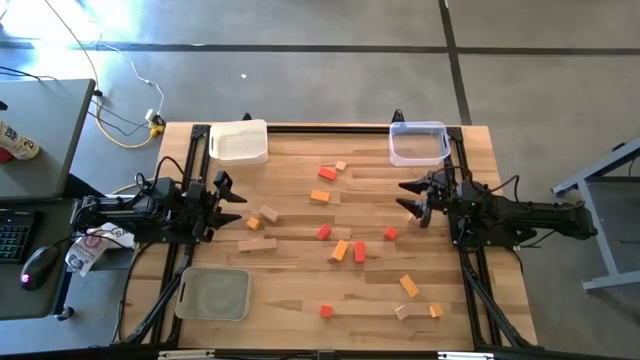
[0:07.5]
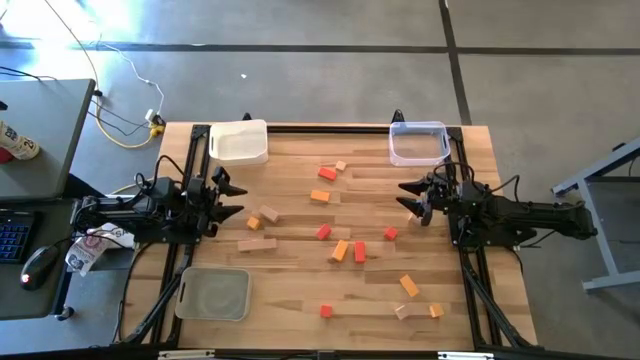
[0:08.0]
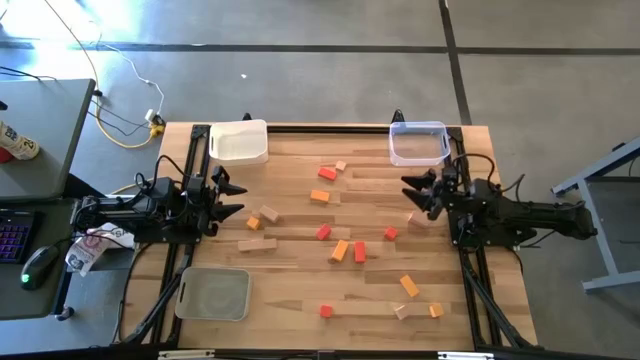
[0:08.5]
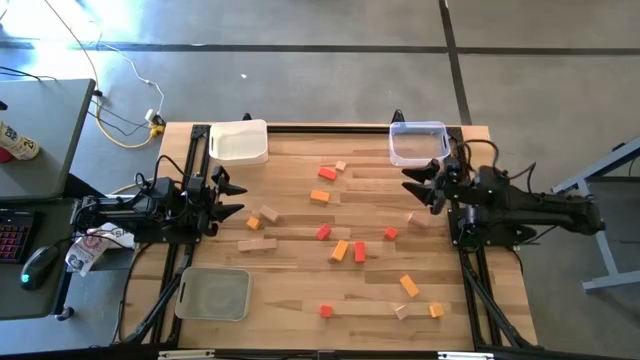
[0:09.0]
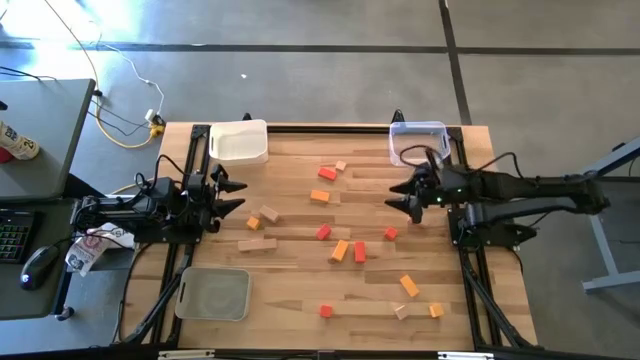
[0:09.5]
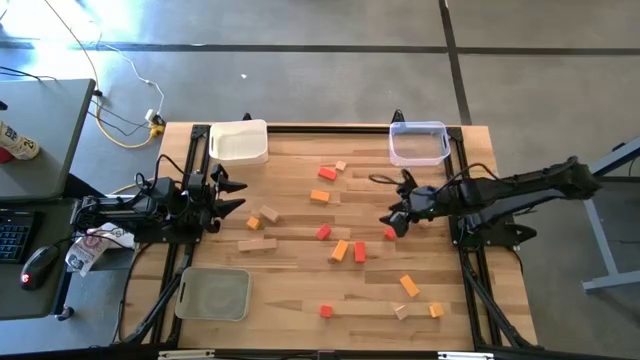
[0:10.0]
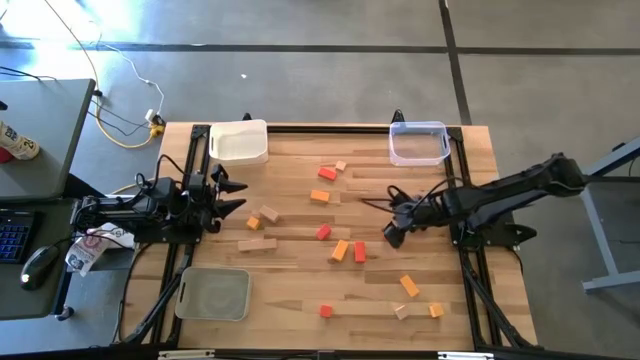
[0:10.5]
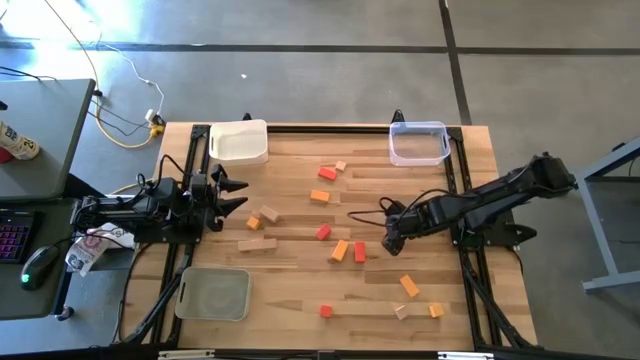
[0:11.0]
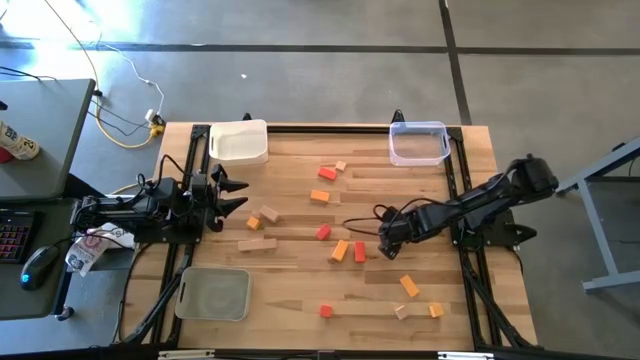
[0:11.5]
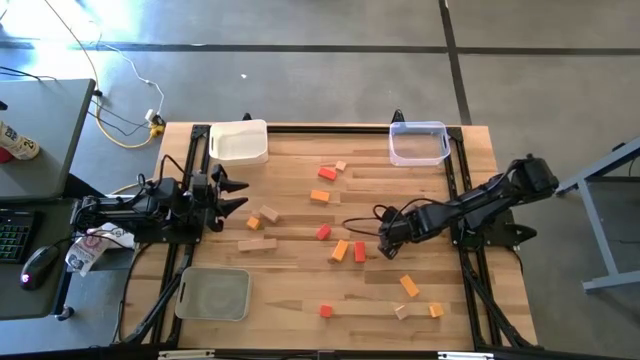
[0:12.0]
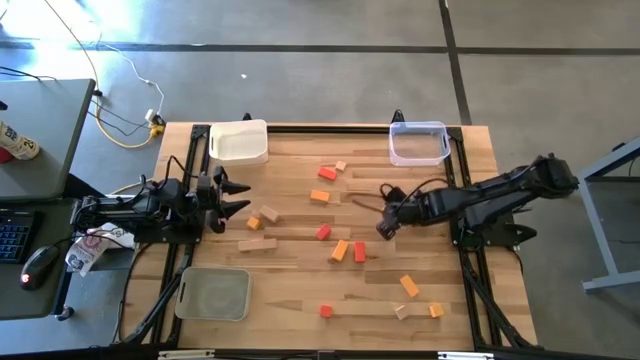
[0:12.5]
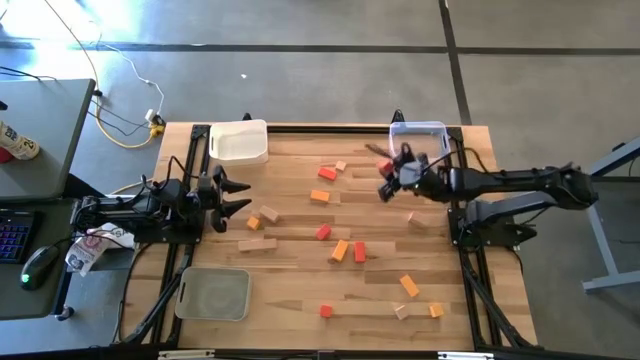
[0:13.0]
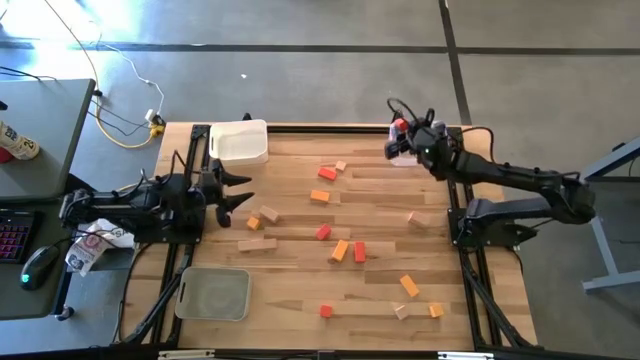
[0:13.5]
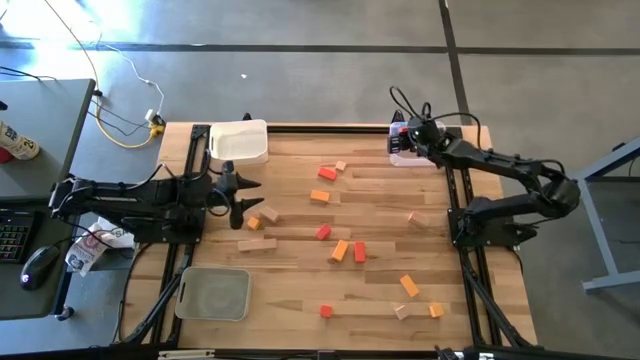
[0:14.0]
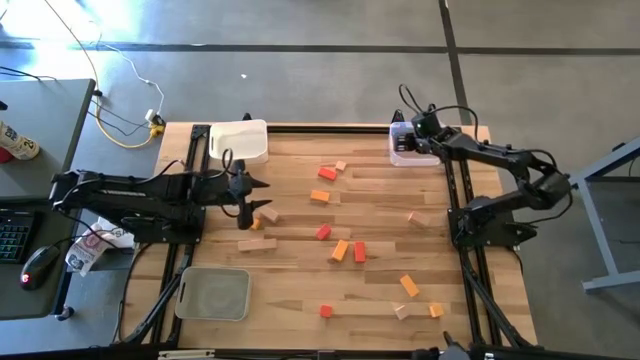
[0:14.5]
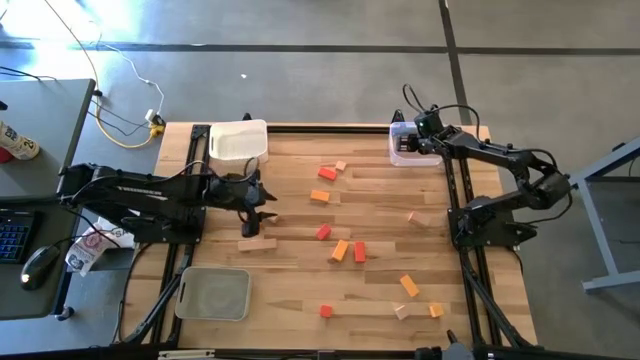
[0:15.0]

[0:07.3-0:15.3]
Task: Sort & place blocks by color
Put the orange block into the transparent bin

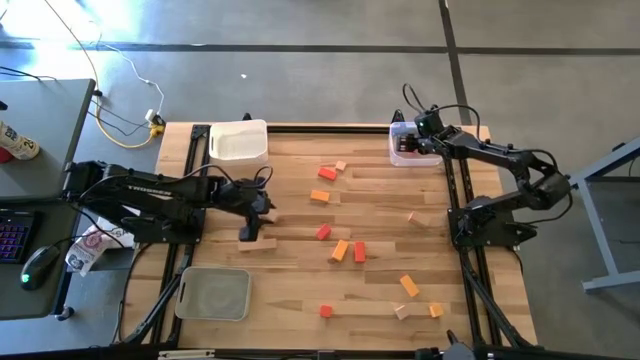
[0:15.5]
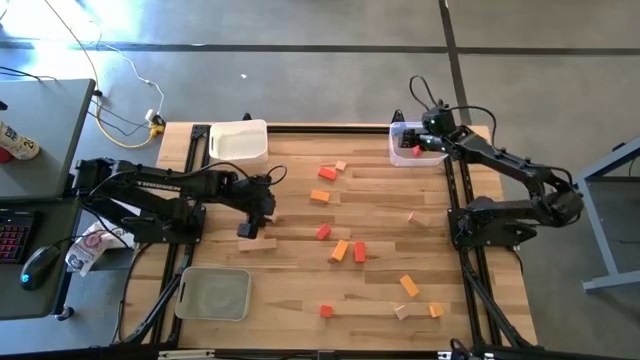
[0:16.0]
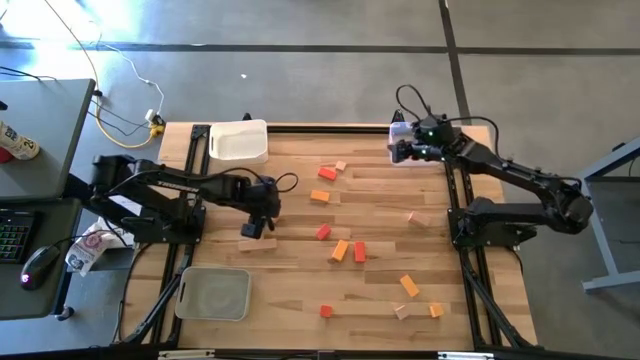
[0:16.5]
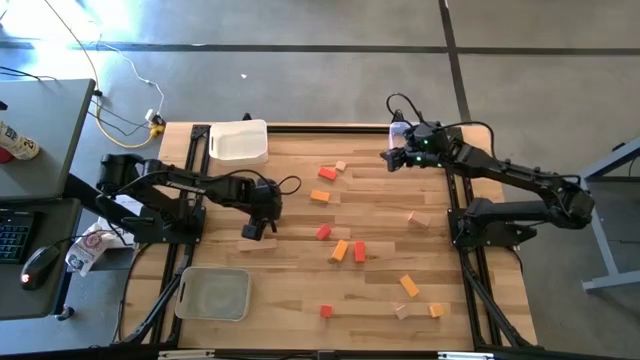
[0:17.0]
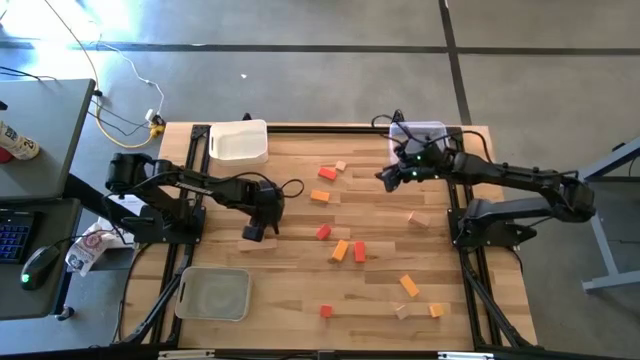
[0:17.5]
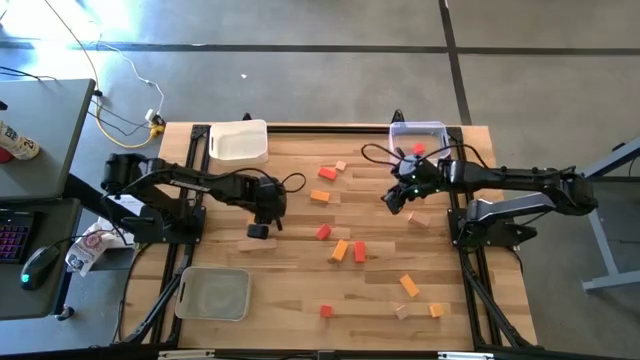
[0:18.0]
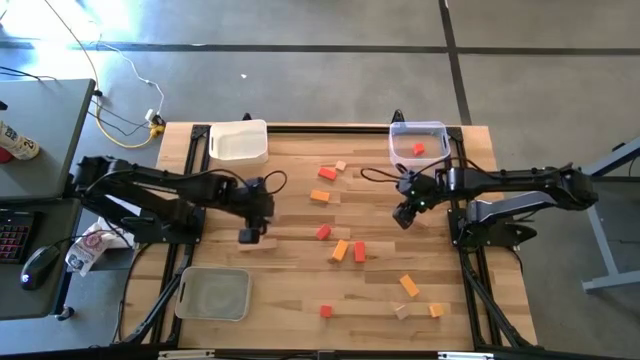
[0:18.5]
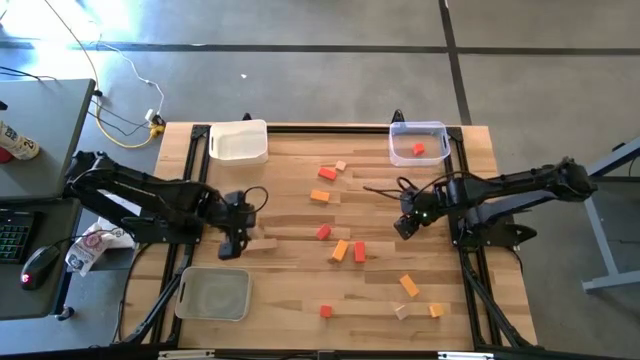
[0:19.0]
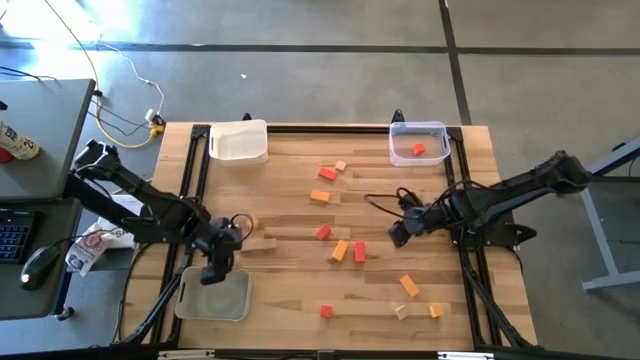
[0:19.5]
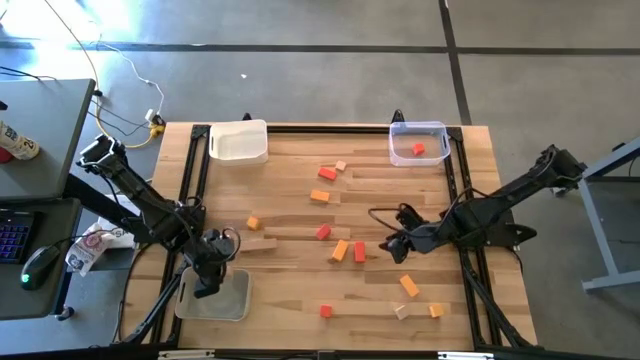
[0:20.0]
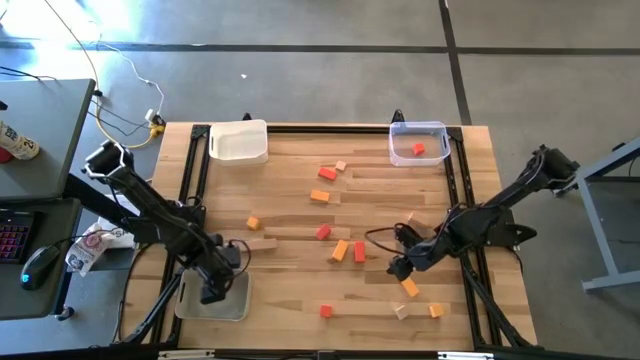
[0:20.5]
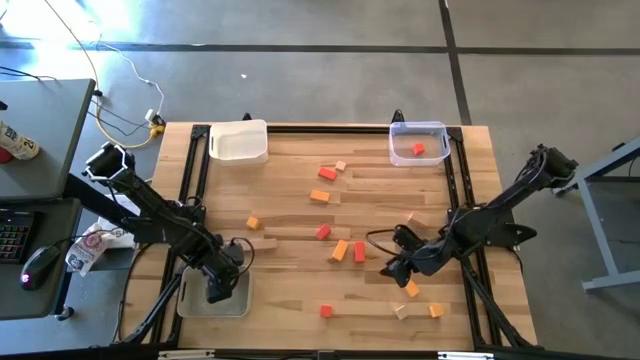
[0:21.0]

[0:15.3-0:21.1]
Put the brown block into the gray bin

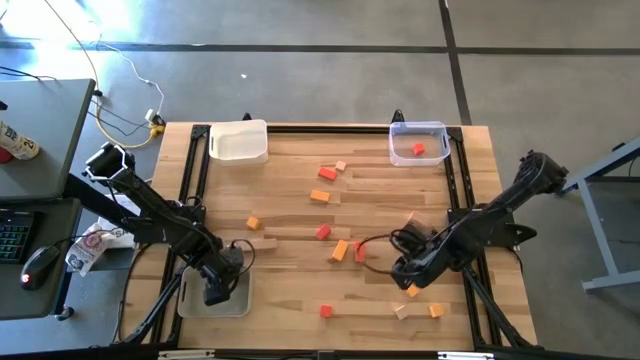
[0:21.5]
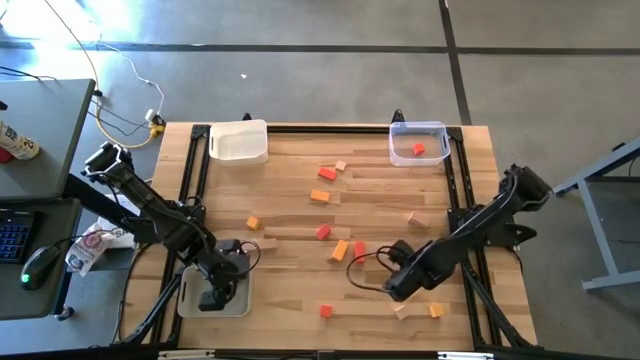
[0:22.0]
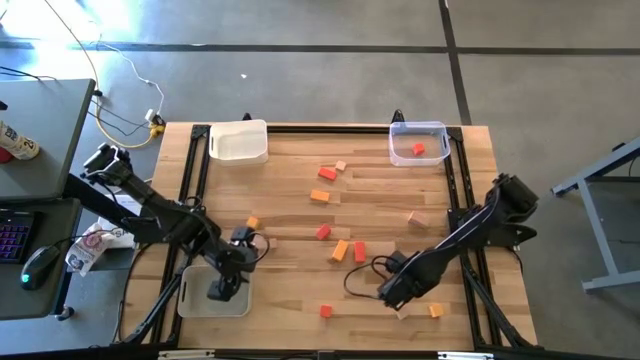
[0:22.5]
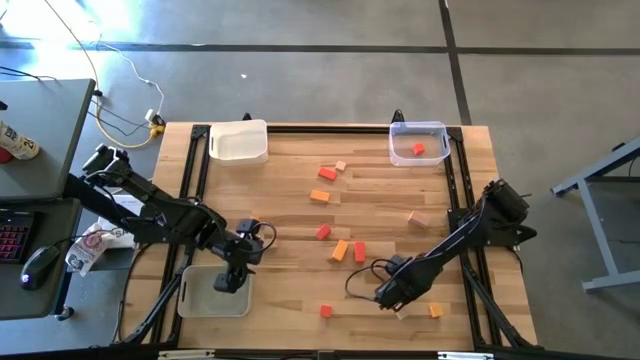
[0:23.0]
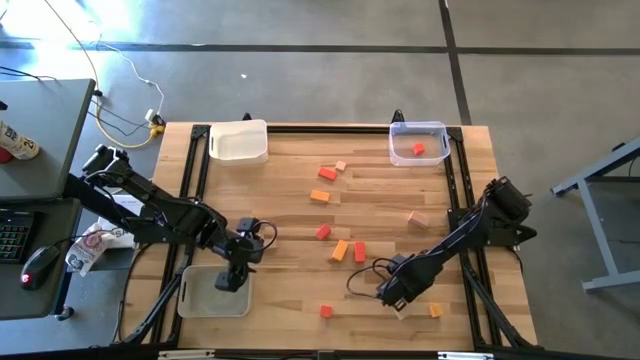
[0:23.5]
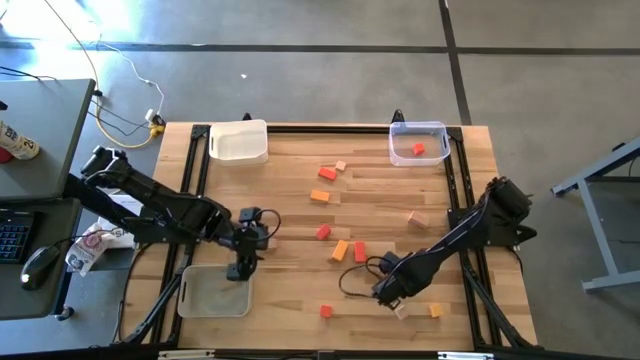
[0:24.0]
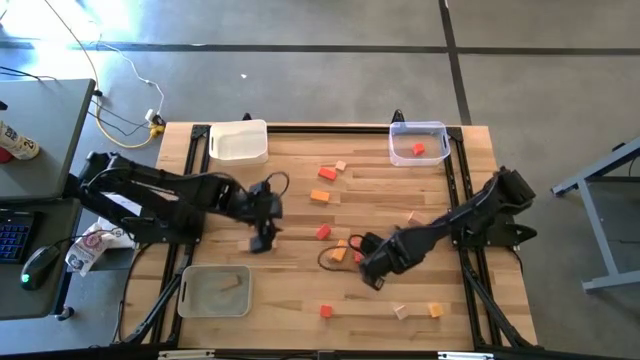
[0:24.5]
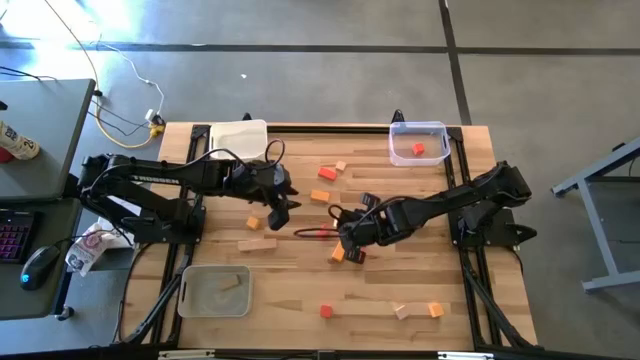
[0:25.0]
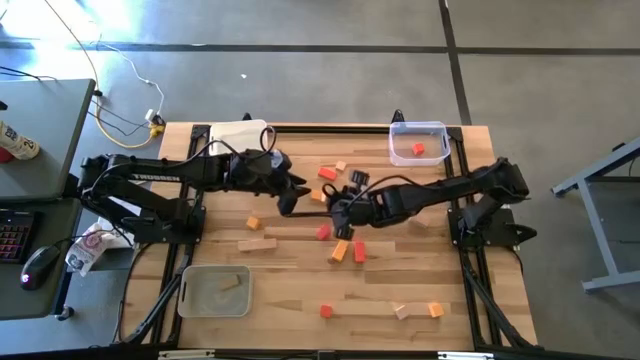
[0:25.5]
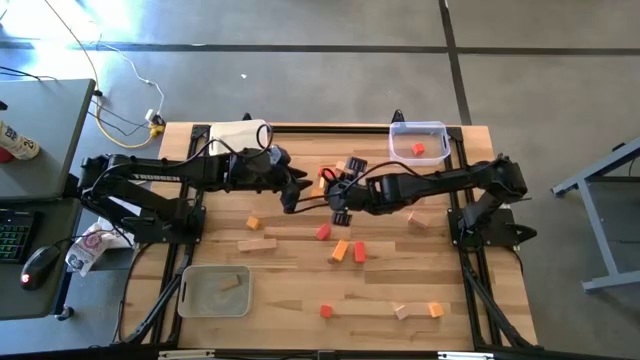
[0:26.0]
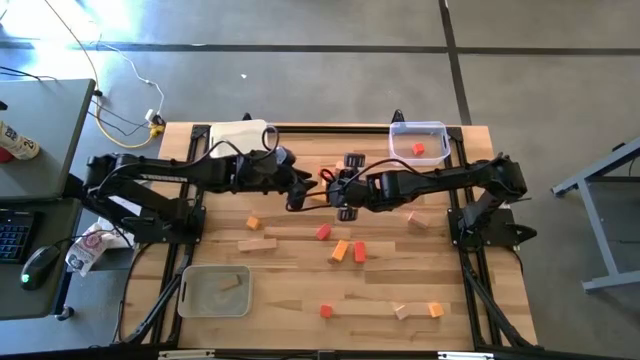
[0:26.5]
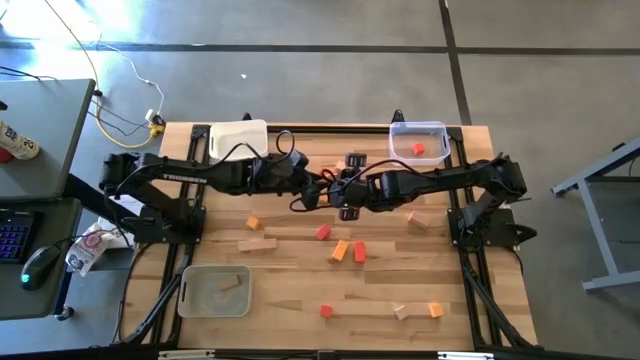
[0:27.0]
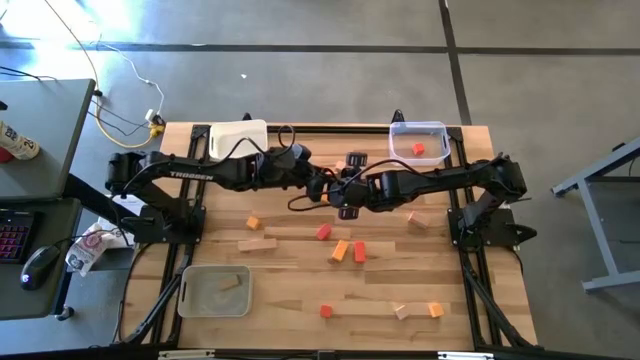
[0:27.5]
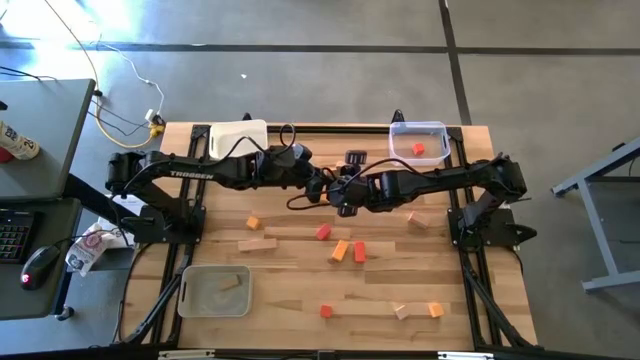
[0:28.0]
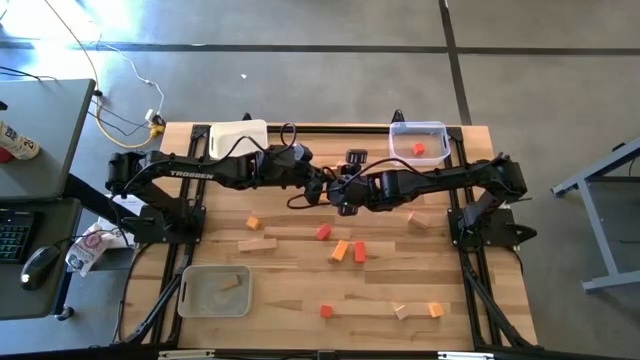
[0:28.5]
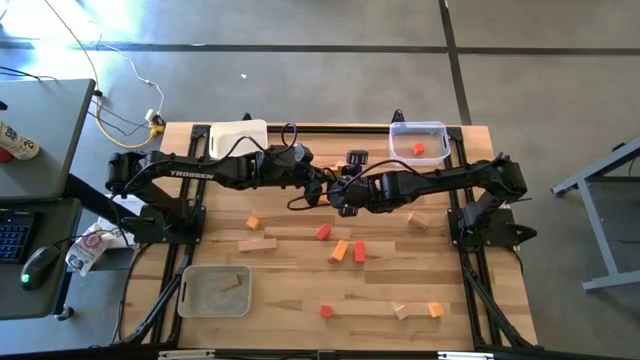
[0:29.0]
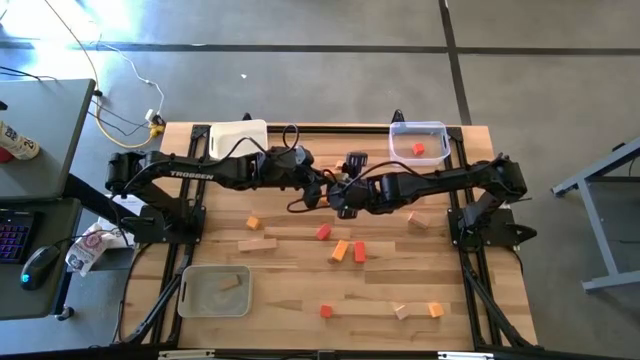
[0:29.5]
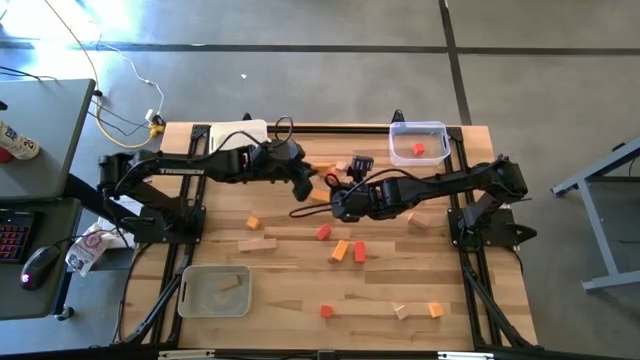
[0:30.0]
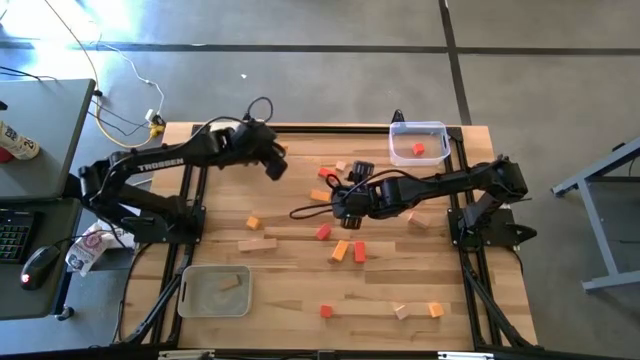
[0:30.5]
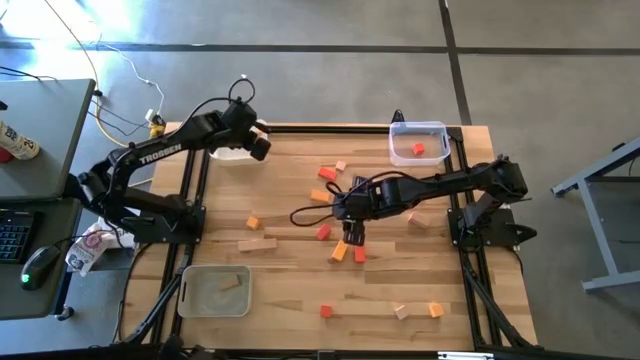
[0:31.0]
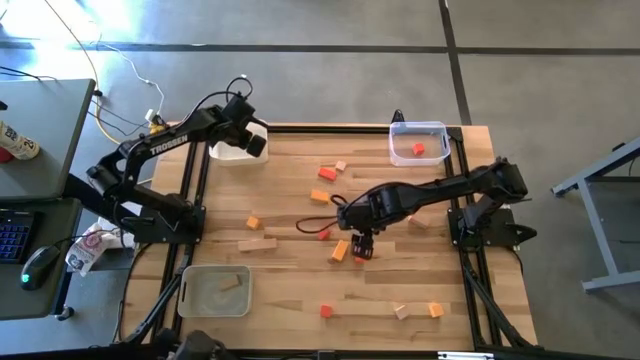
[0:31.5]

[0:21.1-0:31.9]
Put the yellow block into the white bin
